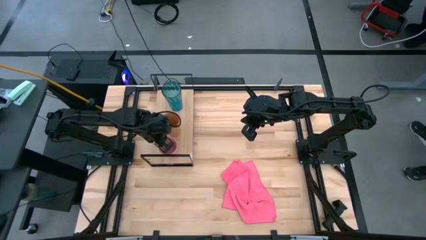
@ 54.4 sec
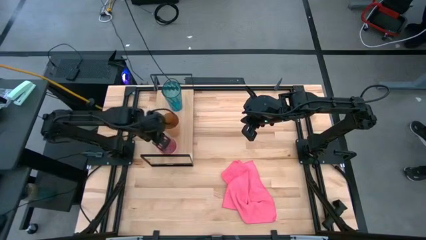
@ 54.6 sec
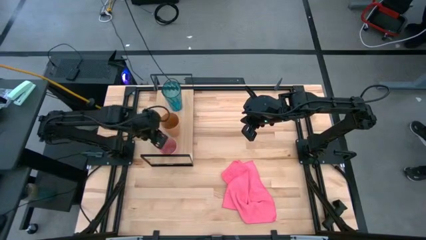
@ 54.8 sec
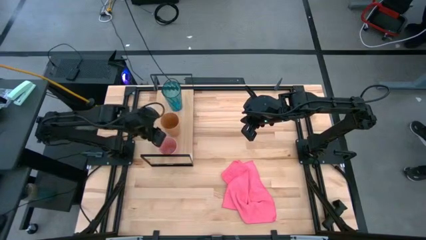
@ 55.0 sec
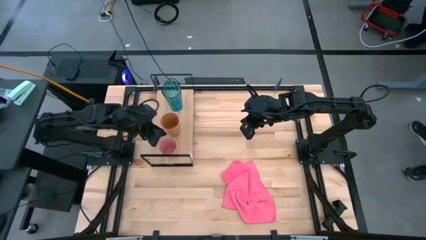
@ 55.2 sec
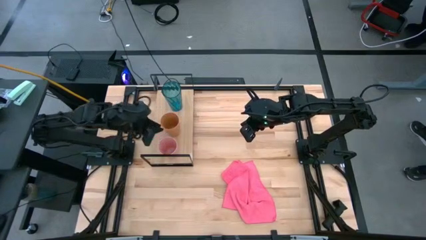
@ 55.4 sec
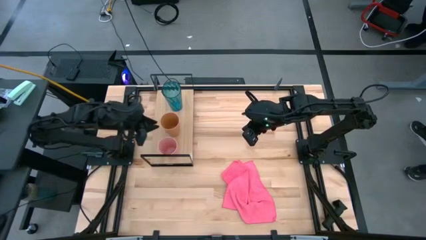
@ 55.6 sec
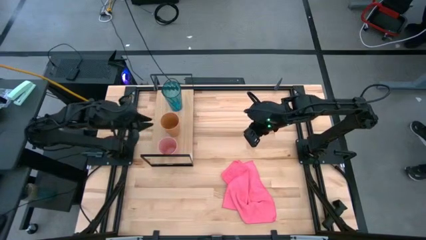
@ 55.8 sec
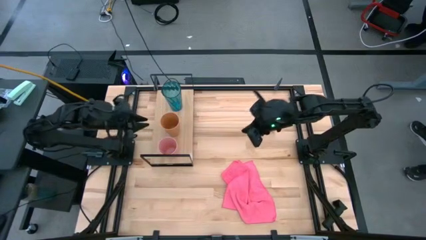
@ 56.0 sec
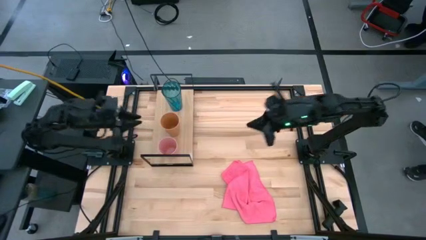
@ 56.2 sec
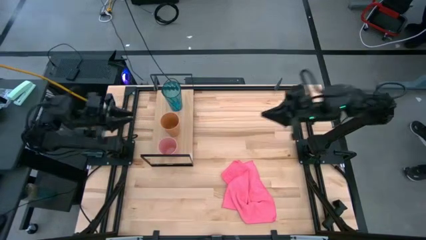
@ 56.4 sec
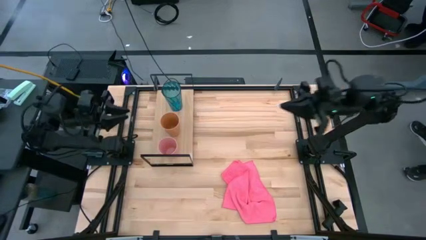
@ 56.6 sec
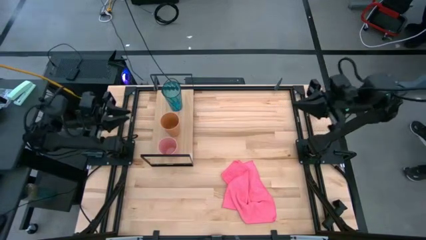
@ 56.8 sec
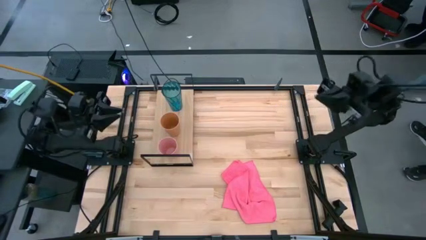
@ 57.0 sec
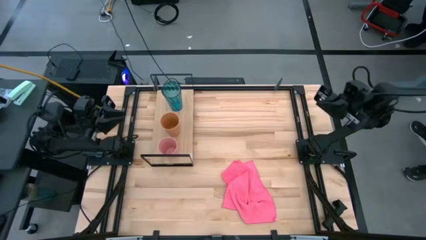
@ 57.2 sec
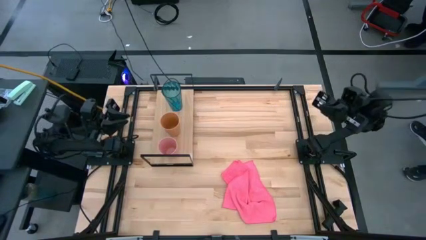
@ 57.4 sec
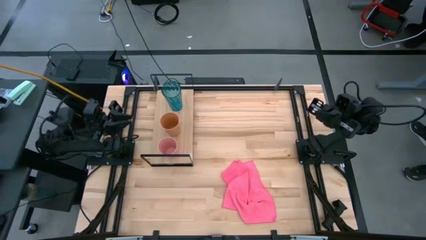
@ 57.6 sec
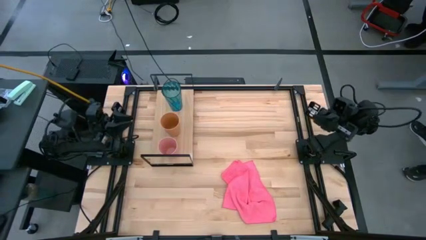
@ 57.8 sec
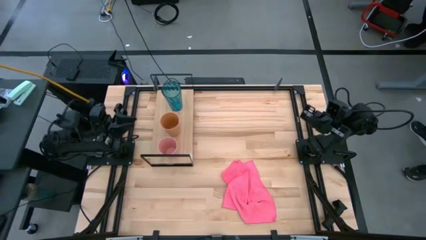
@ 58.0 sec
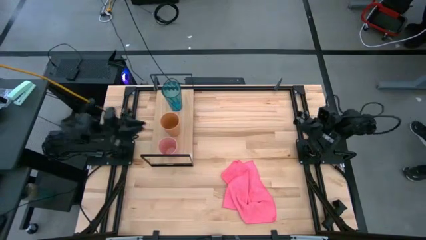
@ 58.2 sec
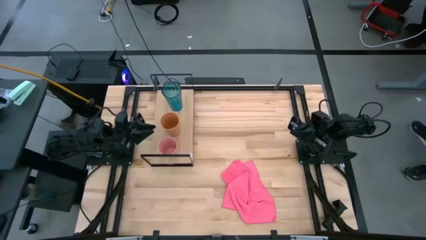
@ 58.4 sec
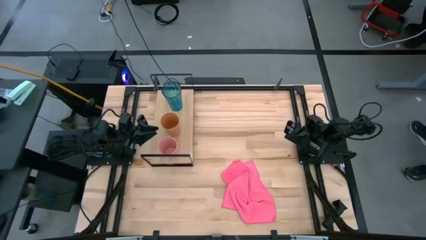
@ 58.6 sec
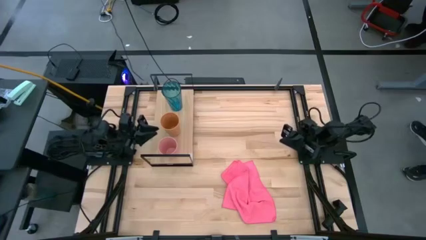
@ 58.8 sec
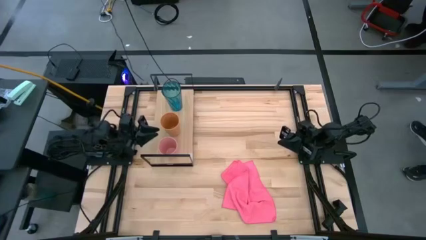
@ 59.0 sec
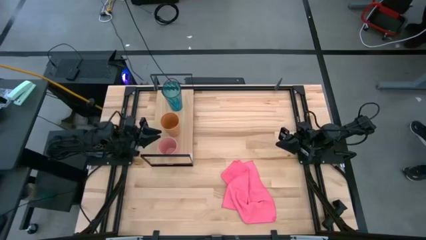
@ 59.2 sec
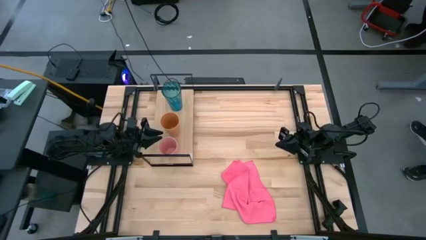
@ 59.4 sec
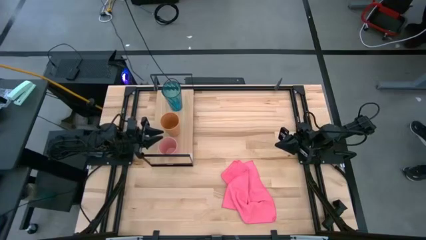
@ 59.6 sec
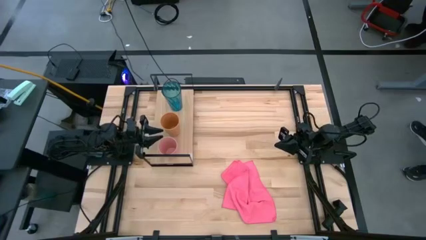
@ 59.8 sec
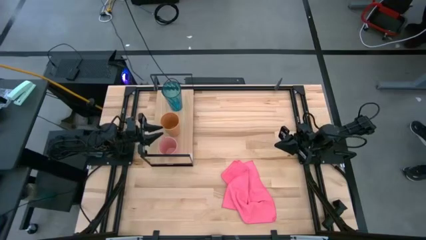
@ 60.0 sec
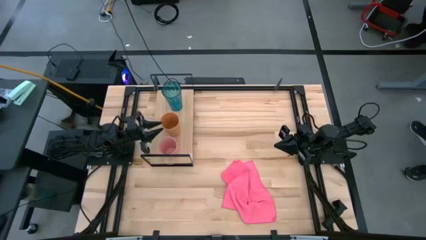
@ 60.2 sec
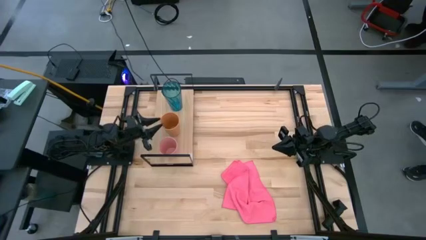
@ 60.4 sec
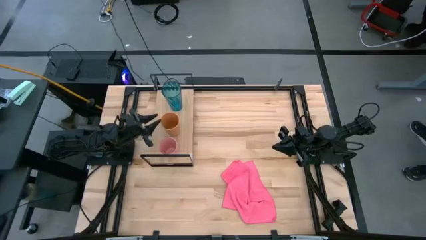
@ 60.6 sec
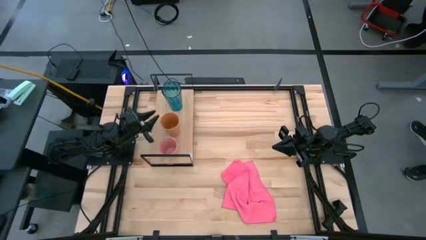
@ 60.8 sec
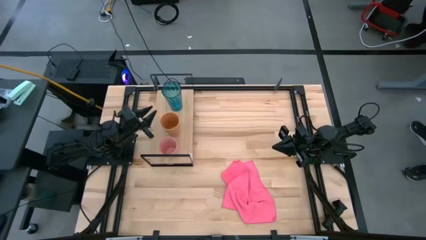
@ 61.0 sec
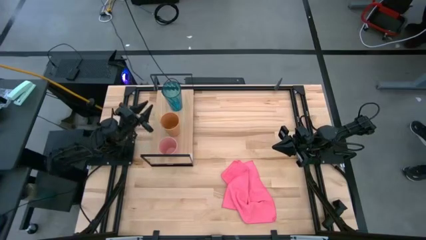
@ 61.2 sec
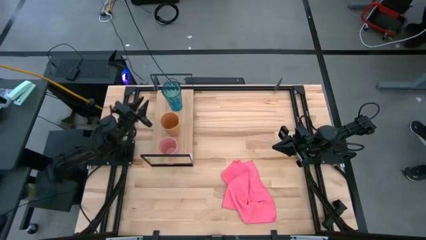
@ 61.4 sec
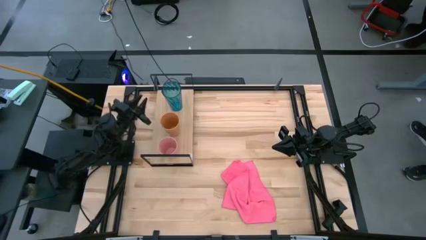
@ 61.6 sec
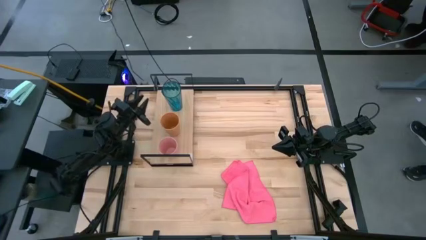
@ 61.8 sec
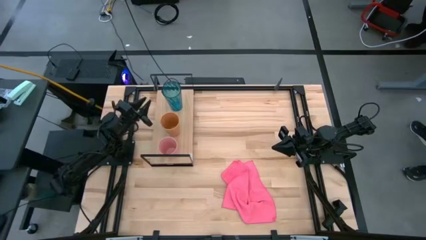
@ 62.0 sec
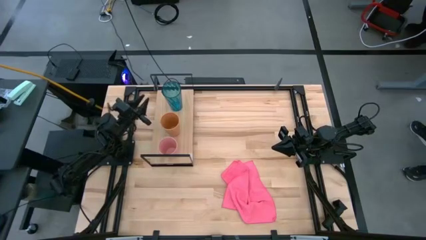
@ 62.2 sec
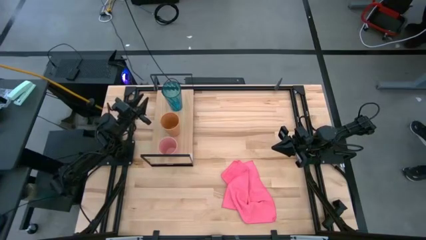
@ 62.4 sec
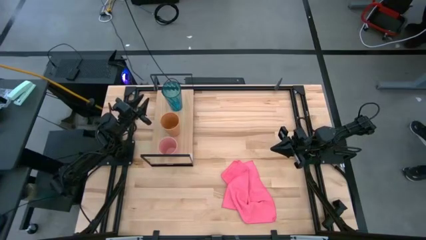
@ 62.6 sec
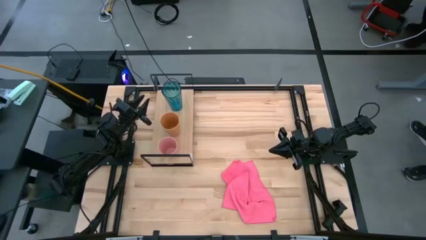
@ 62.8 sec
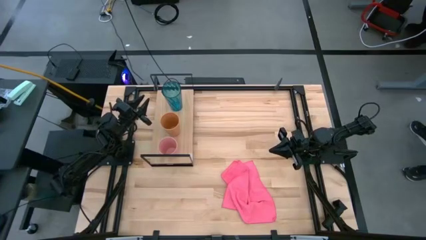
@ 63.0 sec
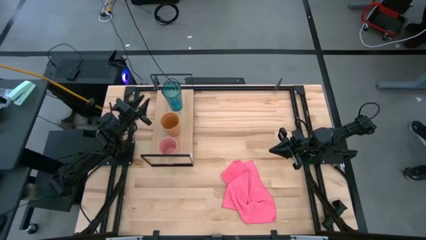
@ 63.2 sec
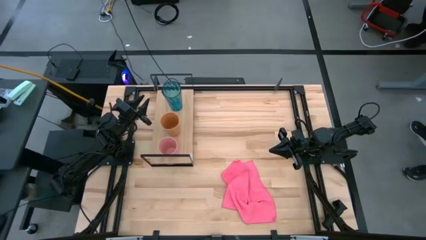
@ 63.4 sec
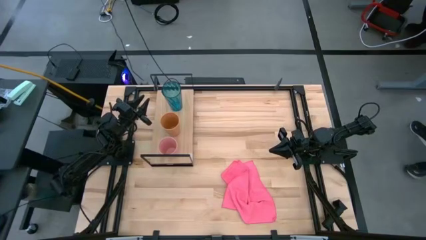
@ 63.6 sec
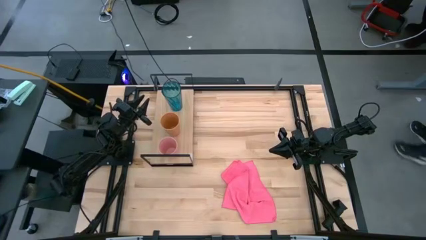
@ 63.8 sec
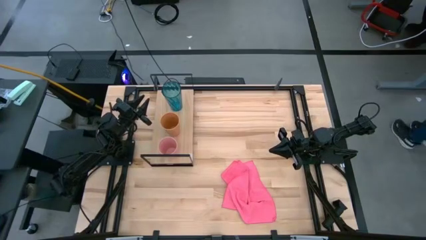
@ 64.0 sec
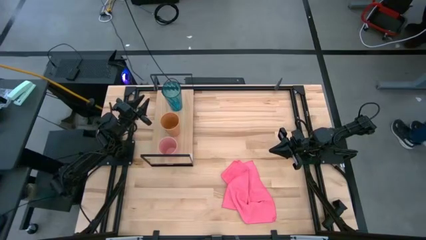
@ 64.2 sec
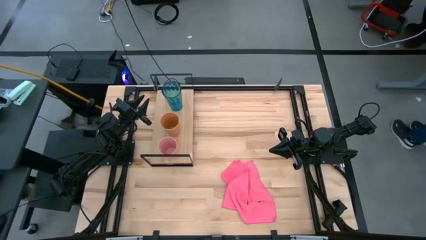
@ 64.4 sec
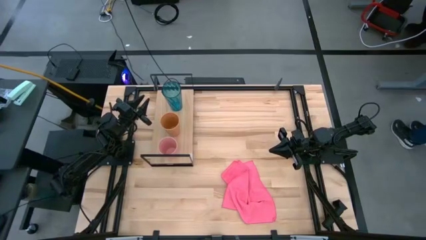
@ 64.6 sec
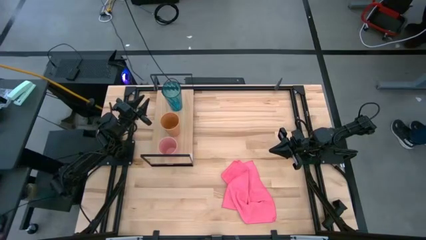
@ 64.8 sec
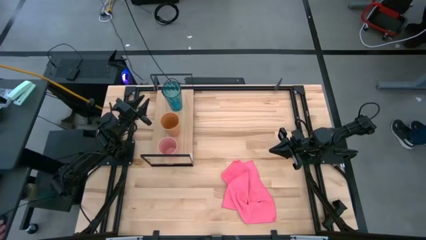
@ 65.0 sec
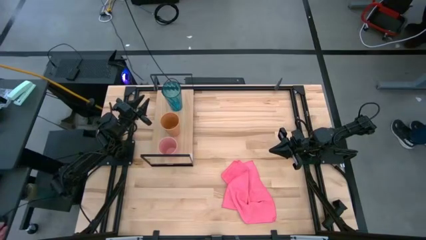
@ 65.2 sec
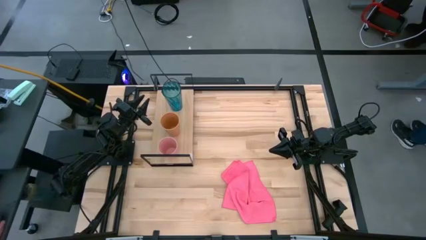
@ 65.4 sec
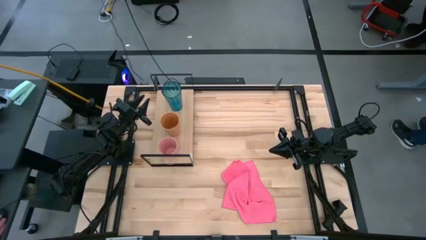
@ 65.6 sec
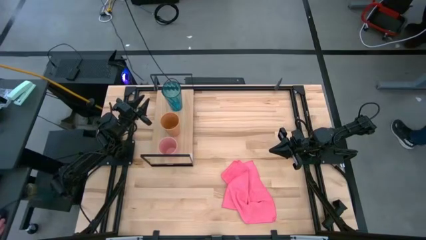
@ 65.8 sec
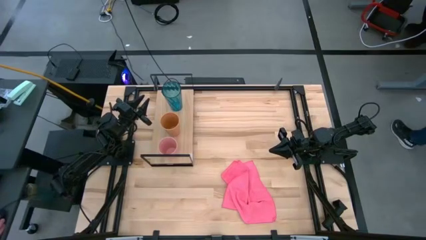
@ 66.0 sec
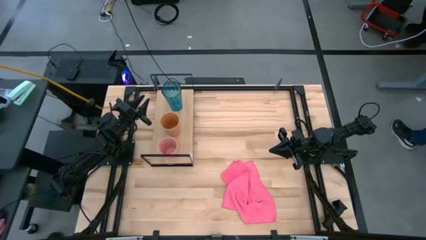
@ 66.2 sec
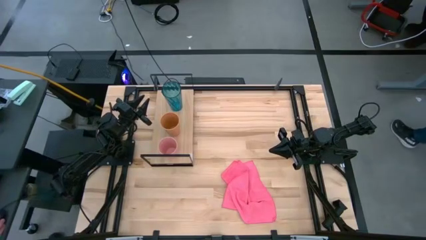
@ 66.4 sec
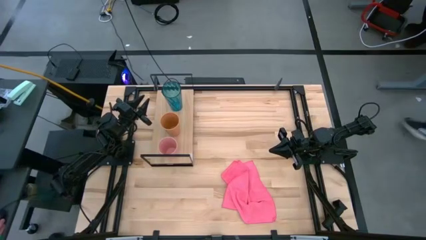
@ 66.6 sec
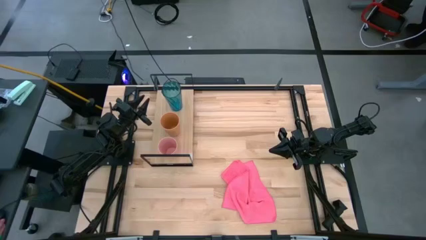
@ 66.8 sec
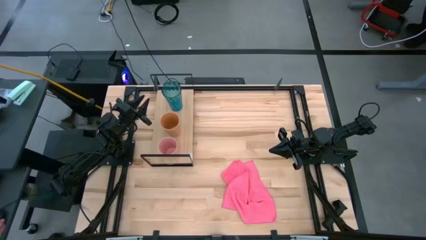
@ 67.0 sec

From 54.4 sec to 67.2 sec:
Task: Stack small to large cups/mugs on shelf
Return to Home Position
